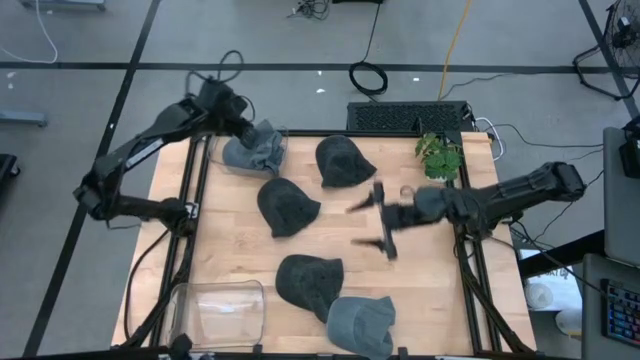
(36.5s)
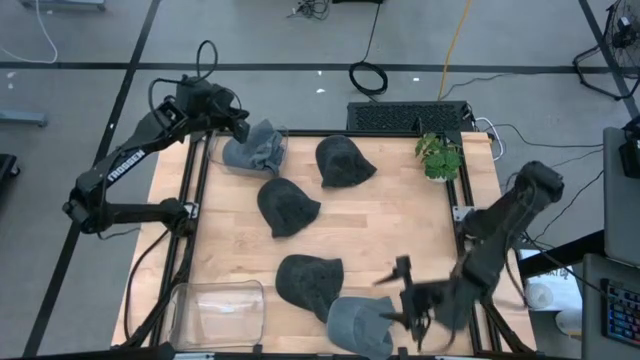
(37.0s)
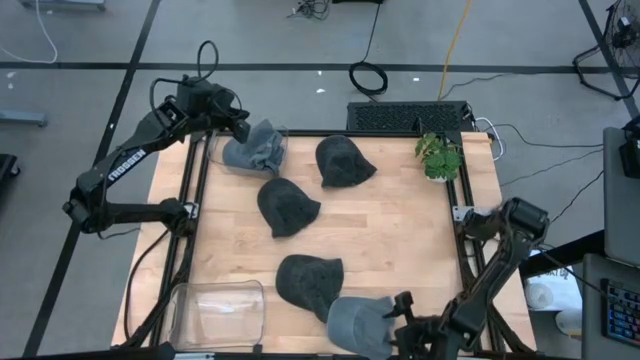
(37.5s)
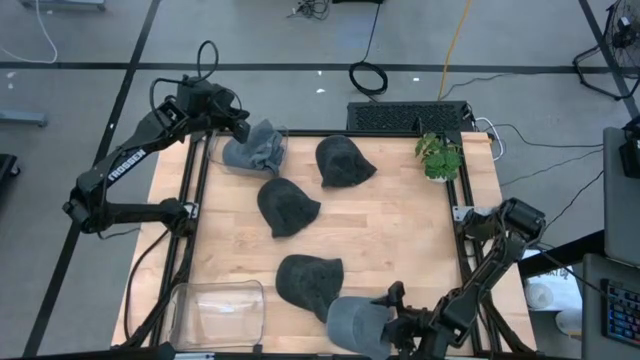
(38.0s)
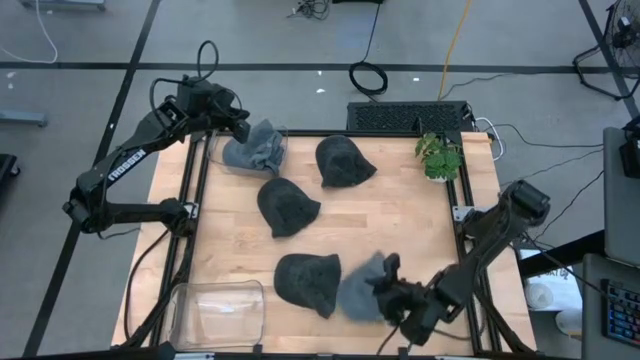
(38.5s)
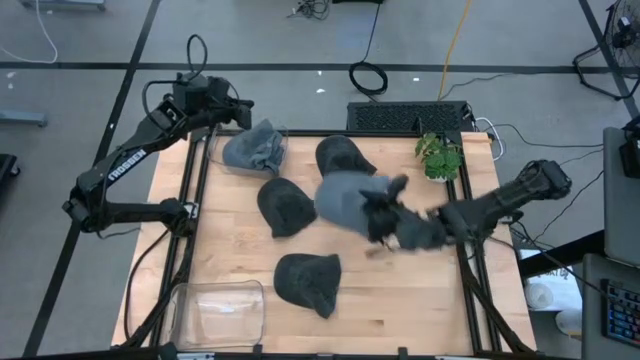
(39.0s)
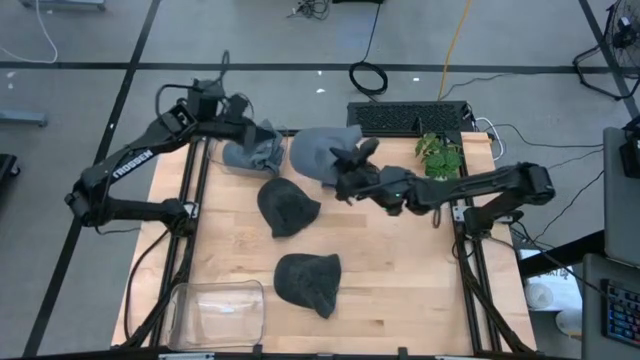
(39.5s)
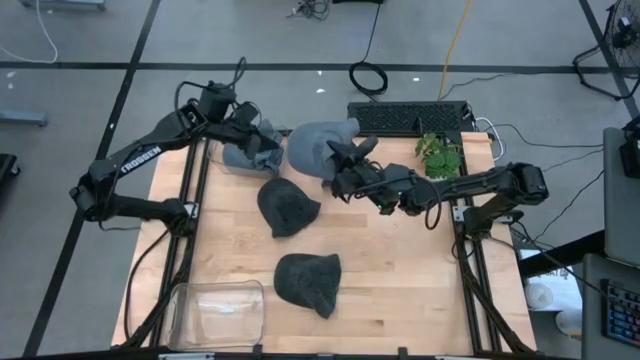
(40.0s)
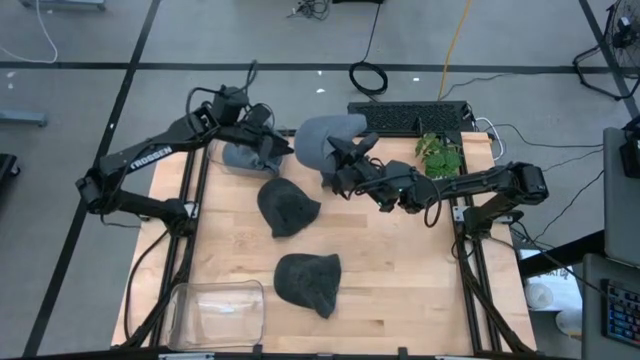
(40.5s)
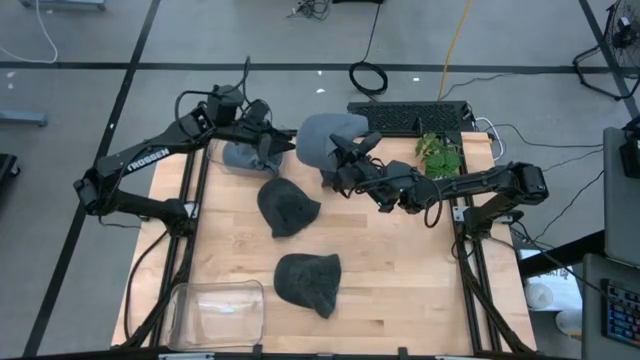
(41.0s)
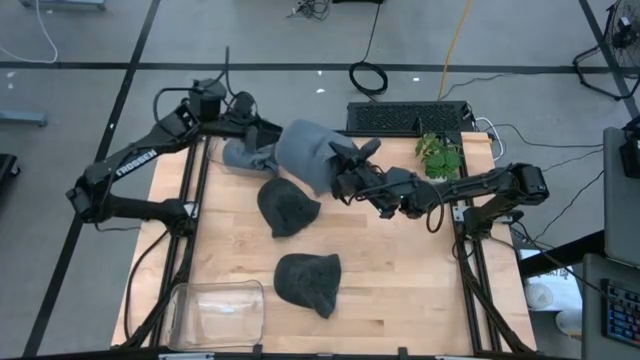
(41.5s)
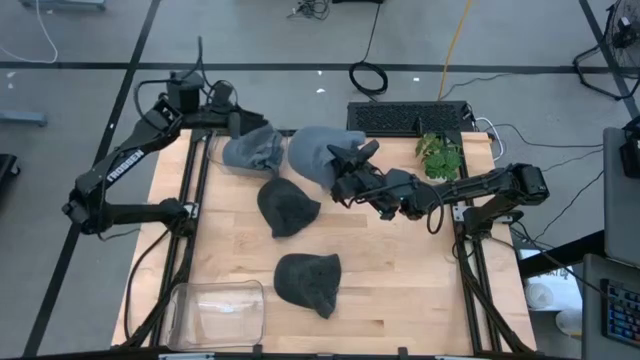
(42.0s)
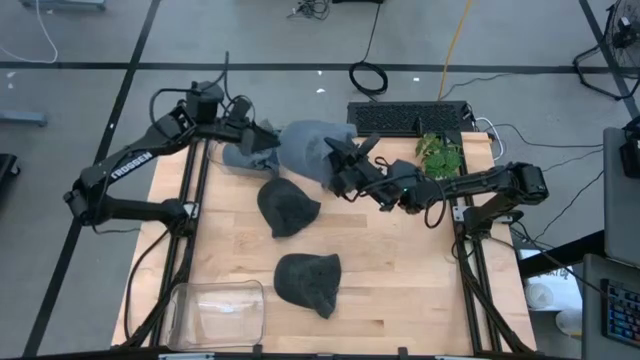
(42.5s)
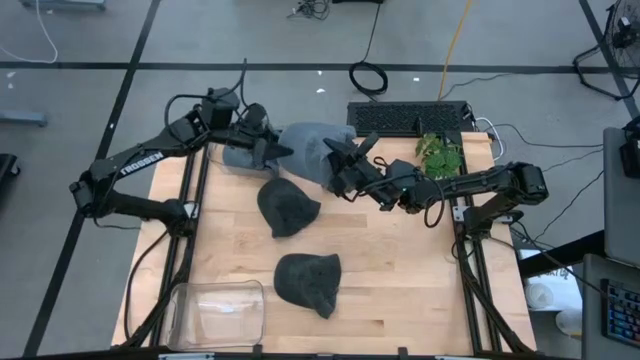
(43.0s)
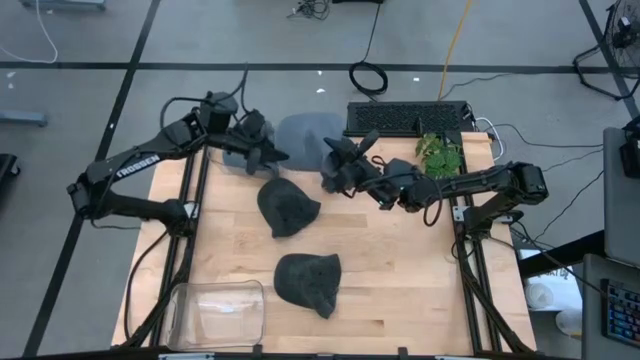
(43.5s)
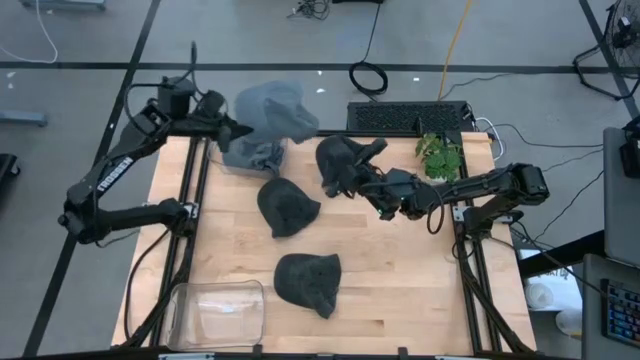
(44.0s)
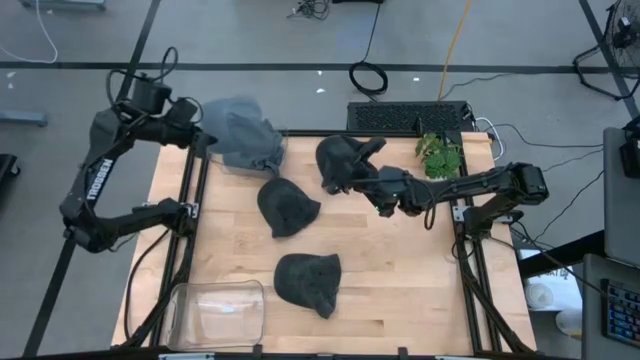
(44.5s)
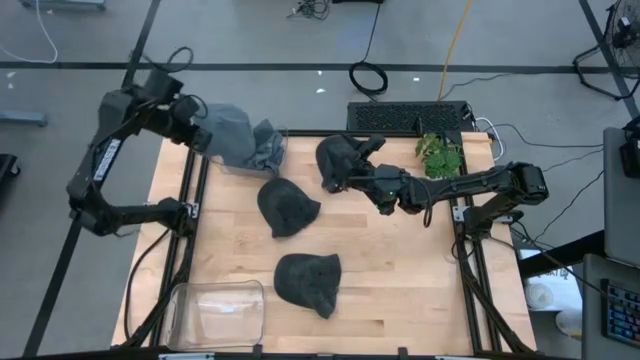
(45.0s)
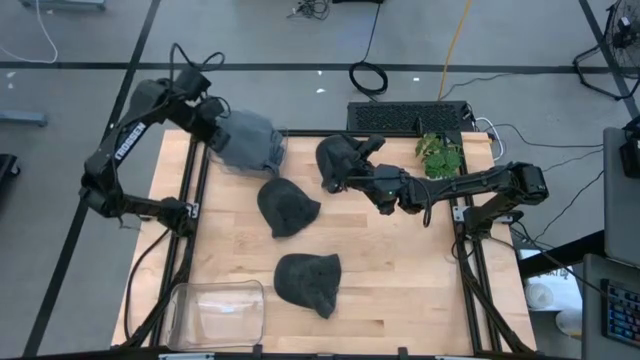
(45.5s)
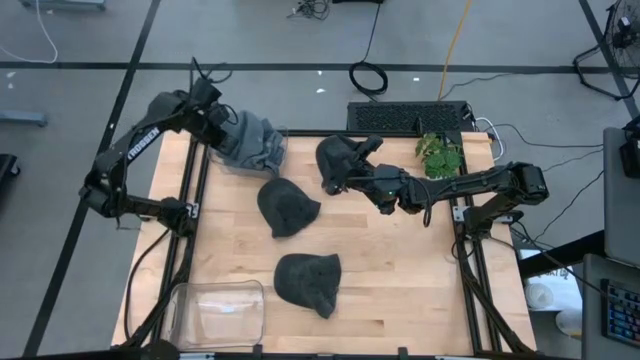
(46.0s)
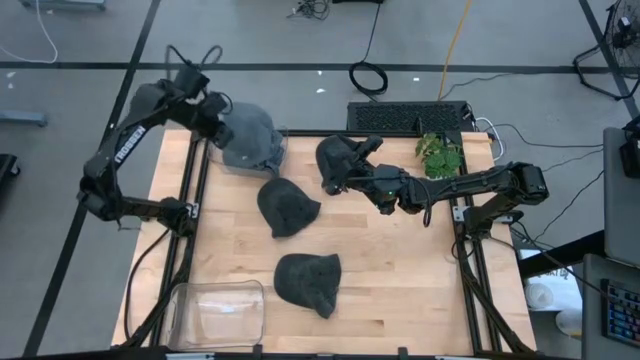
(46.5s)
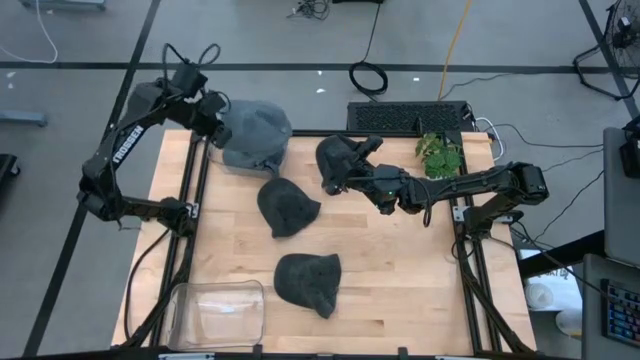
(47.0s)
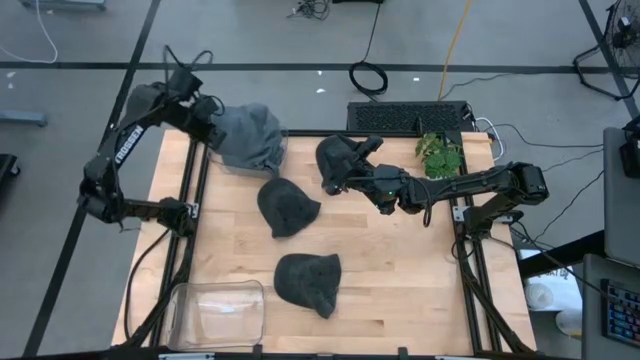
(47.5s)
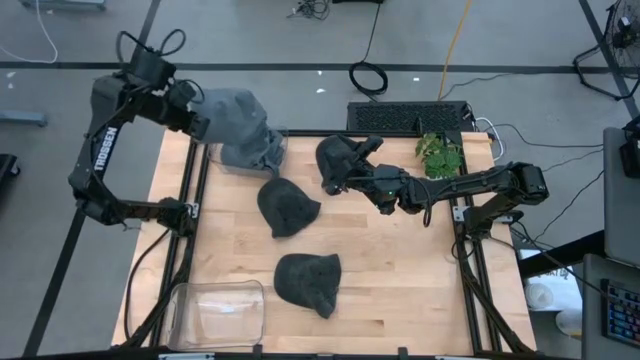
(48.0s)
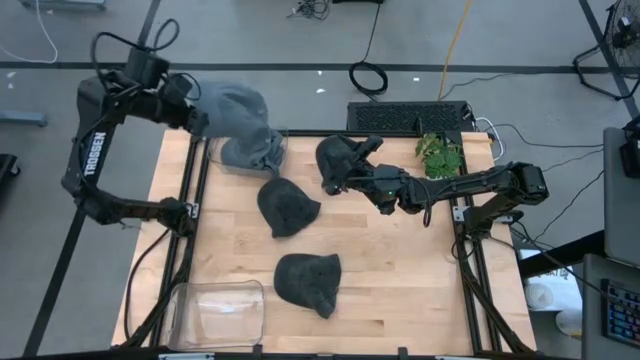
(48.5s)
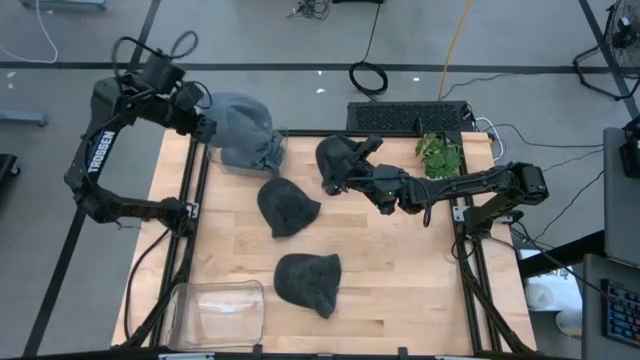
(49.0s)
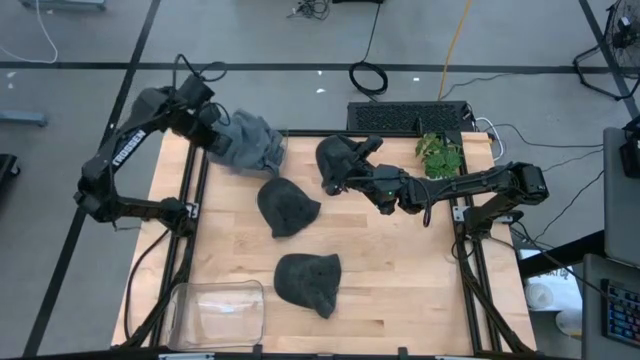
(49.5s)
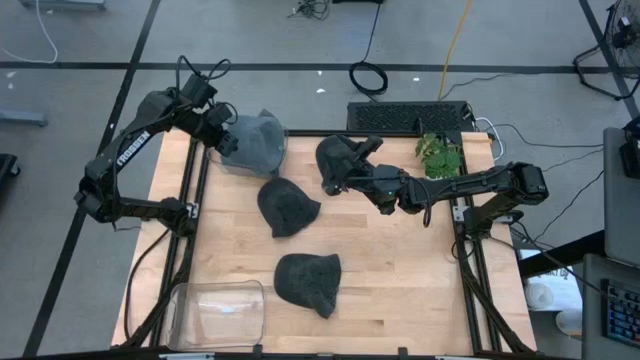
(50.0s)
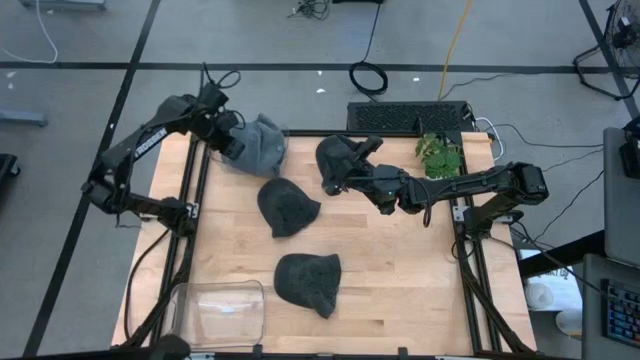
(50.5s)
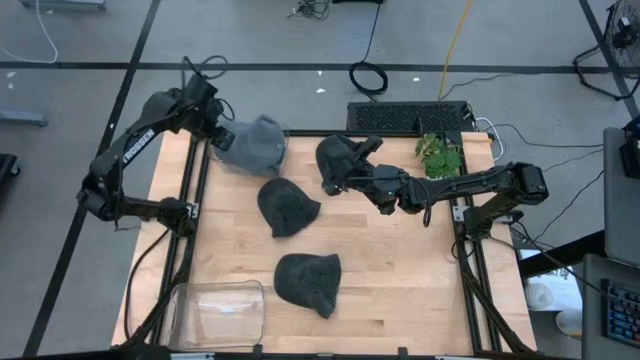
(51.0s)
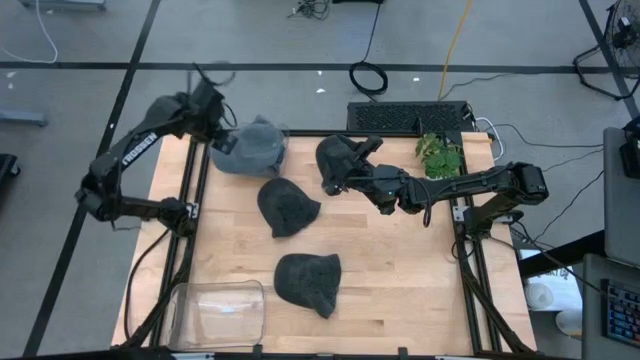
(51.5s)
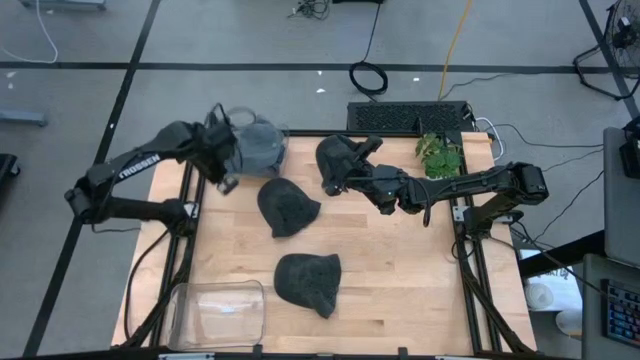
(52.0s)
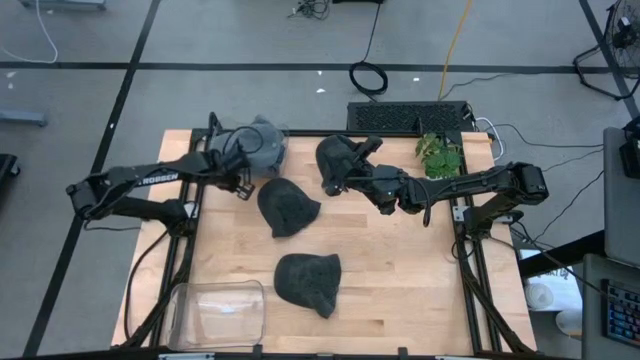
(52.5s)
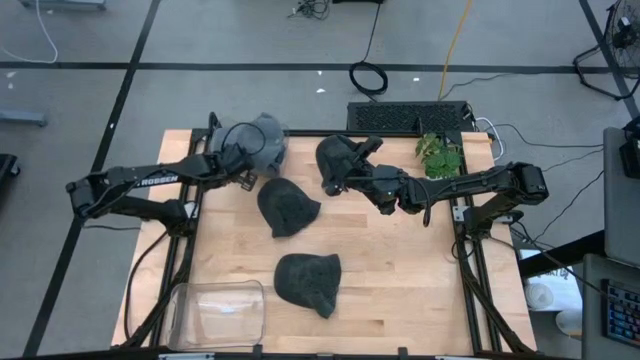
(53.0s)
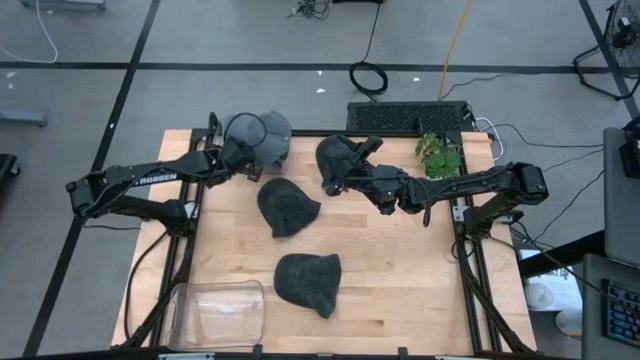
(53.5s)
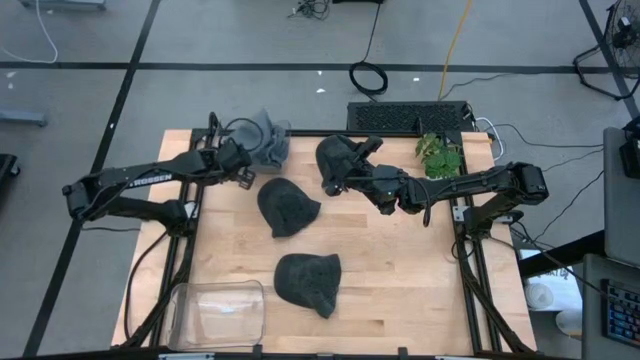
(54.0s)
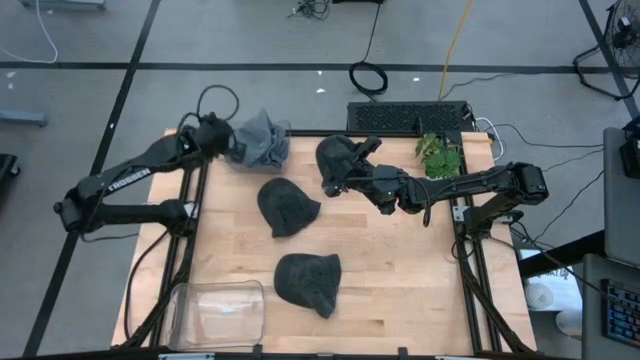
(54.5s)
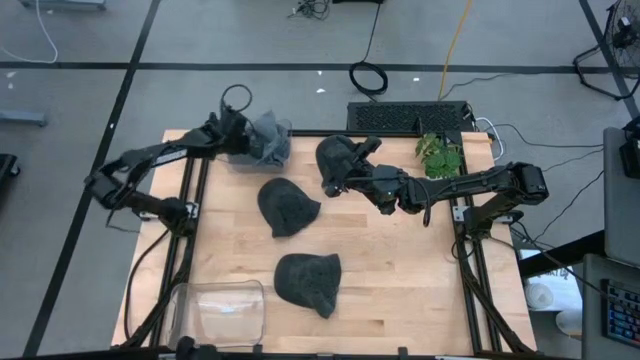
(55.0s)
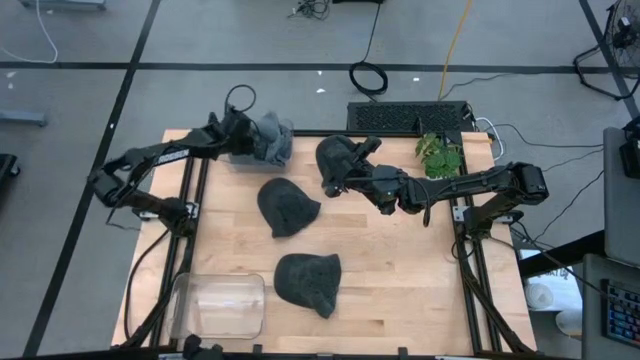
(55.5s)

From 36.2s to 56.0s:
Task: Pick & Place hat
Put the gray cap into the top transparent bin

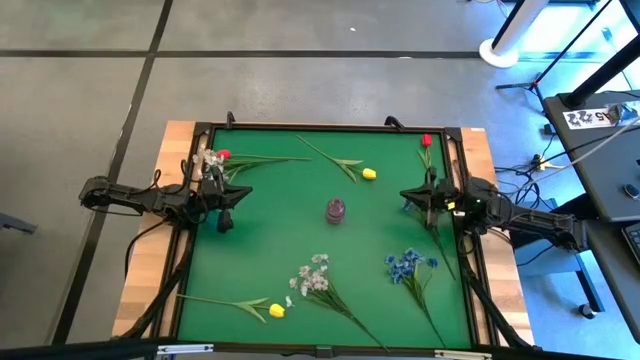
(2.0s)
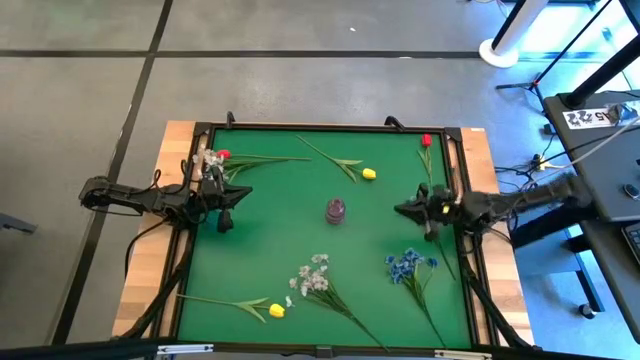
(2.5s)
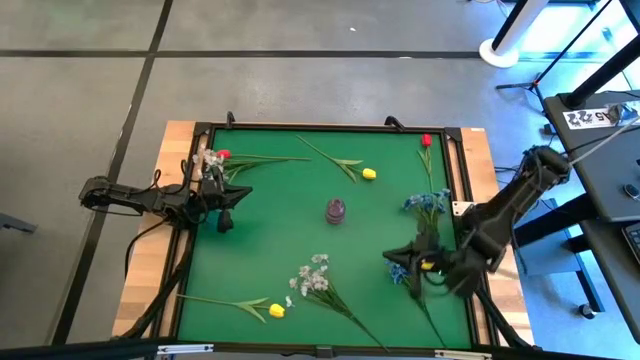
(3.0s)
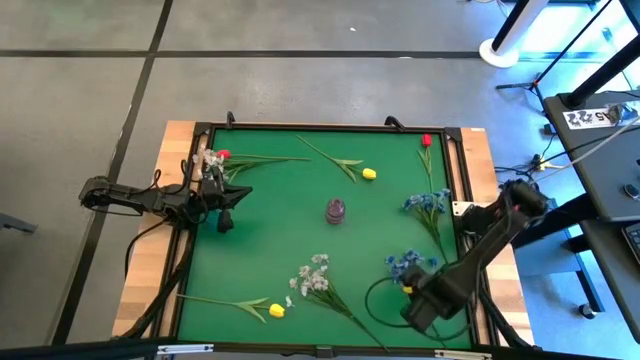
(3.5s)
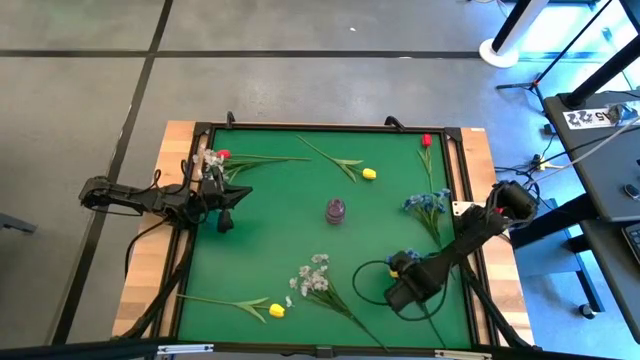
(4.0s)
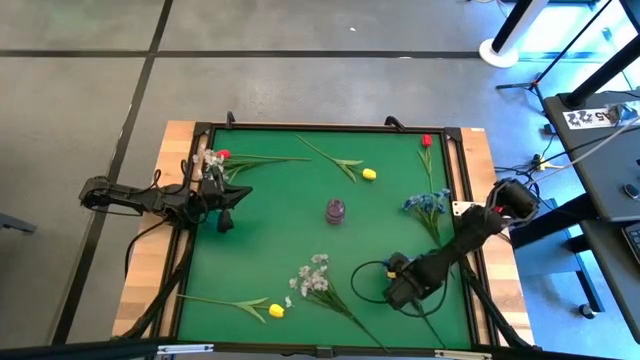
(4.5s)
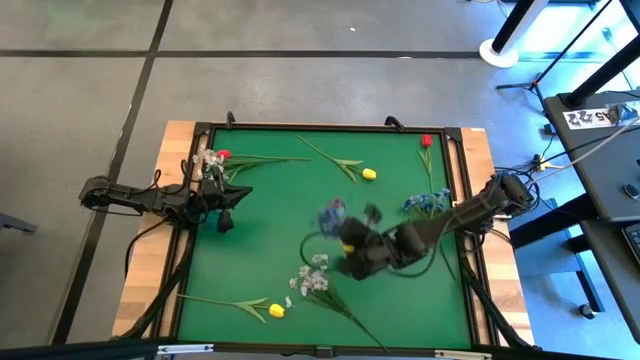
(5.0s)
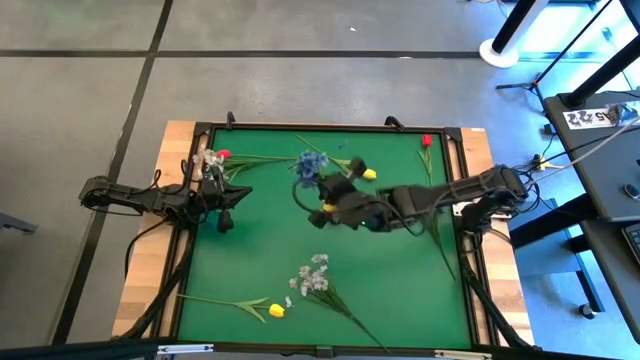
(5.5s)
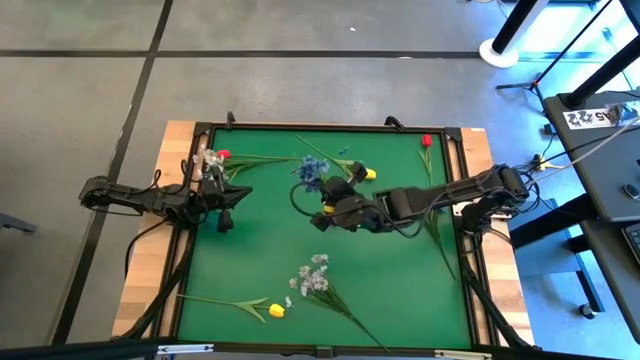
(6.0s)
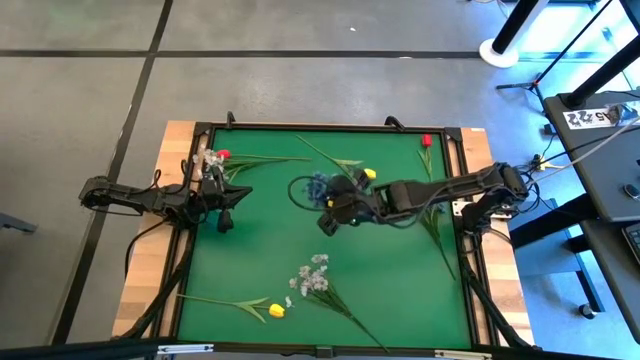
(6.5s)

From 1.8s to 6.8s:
Task: Sort flowers into vase by color
Put the bottom blue flowers into the purple vase
